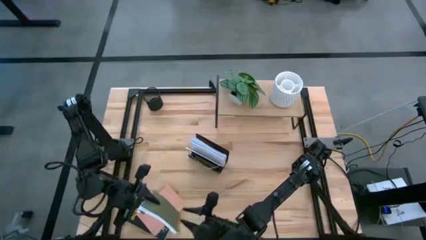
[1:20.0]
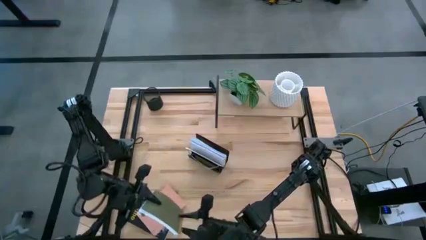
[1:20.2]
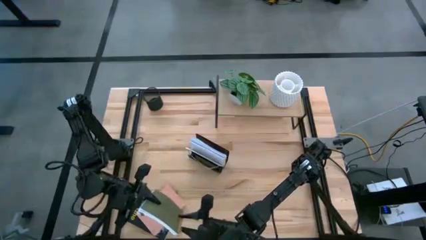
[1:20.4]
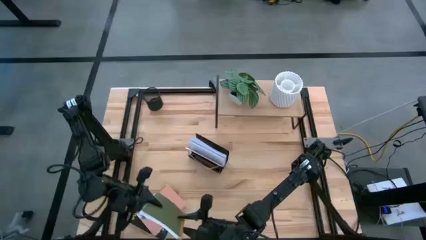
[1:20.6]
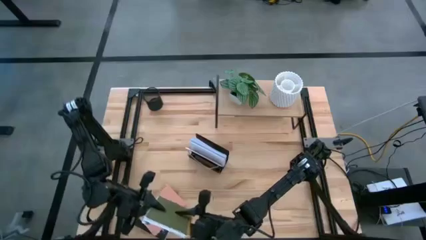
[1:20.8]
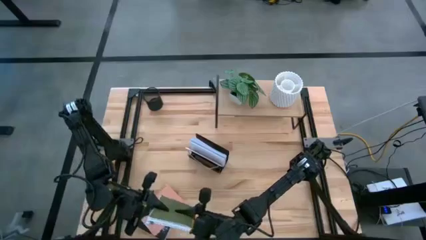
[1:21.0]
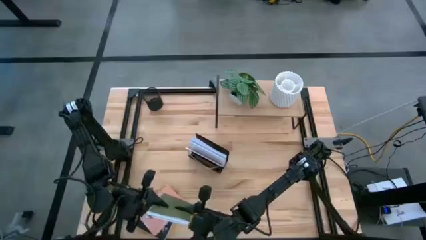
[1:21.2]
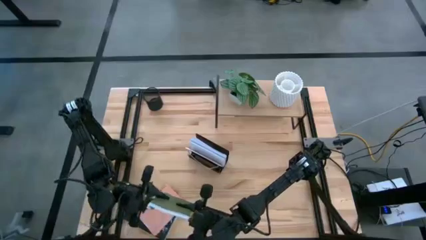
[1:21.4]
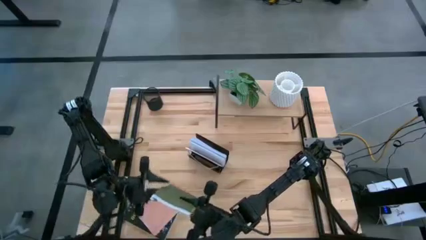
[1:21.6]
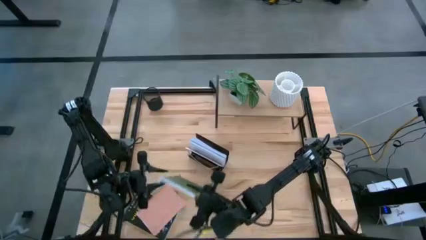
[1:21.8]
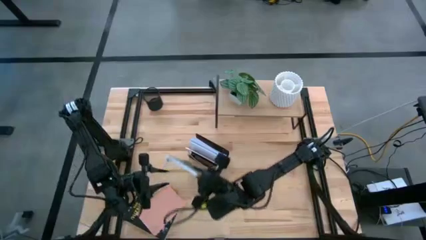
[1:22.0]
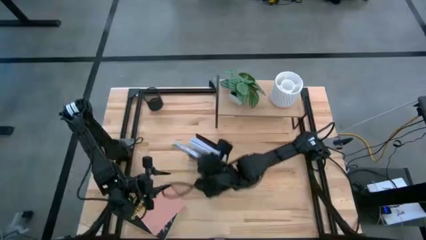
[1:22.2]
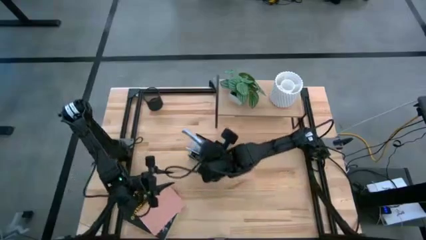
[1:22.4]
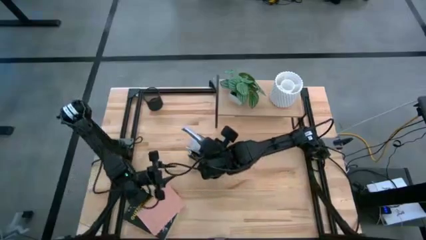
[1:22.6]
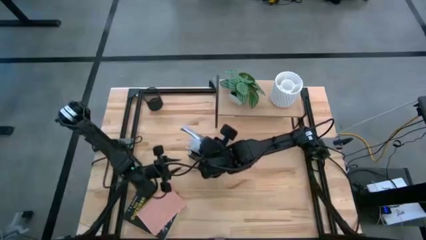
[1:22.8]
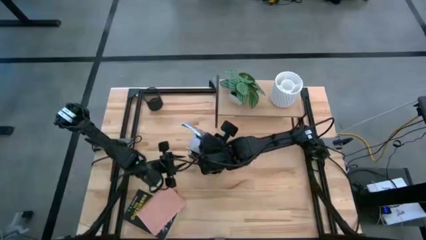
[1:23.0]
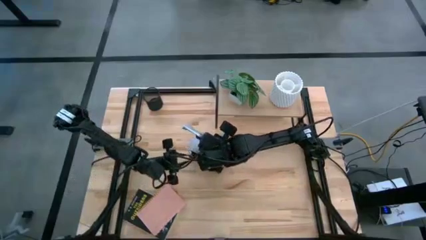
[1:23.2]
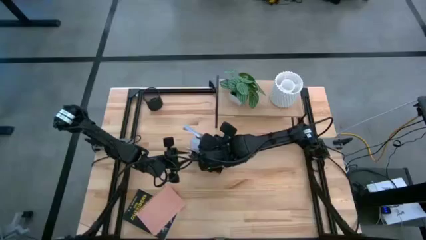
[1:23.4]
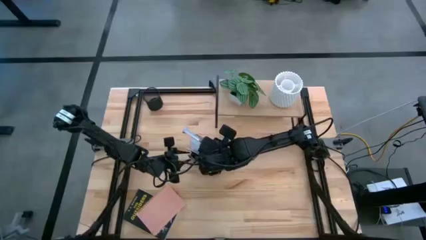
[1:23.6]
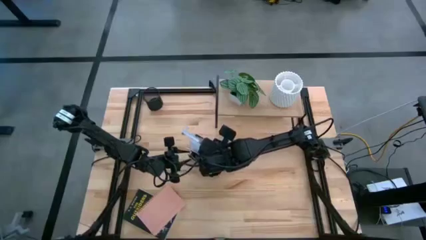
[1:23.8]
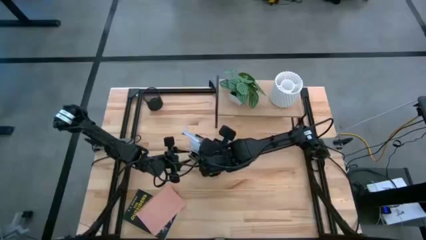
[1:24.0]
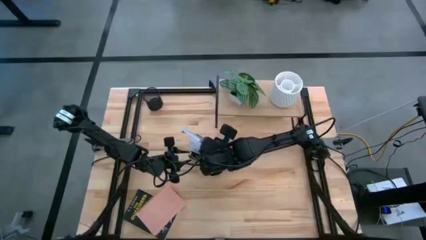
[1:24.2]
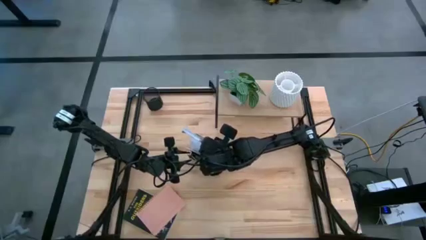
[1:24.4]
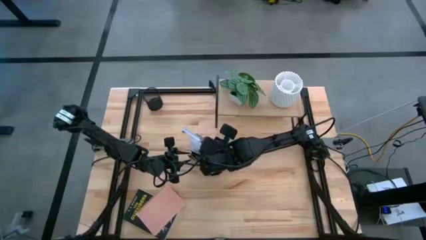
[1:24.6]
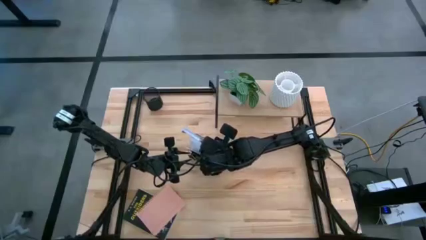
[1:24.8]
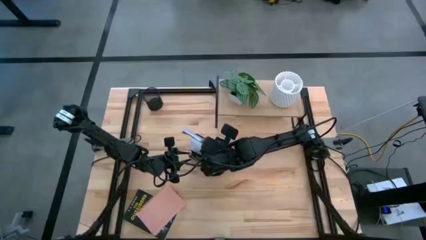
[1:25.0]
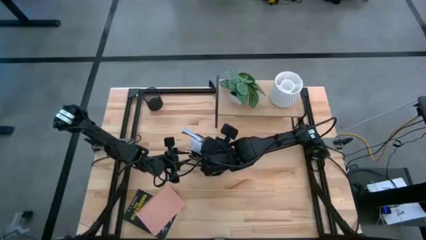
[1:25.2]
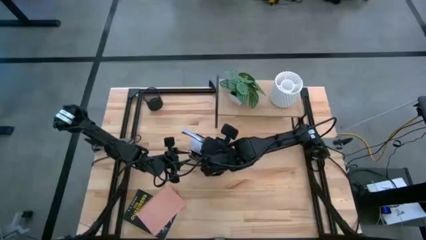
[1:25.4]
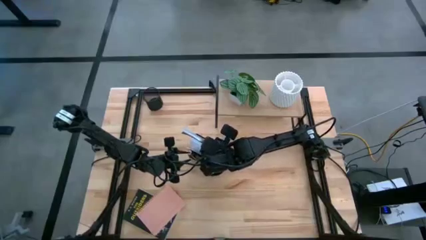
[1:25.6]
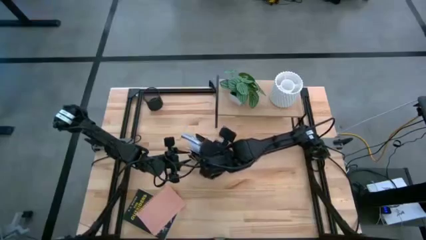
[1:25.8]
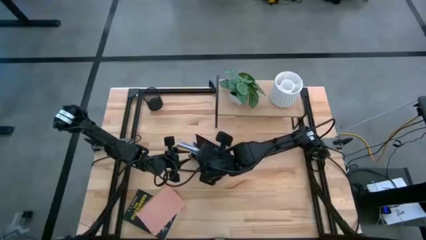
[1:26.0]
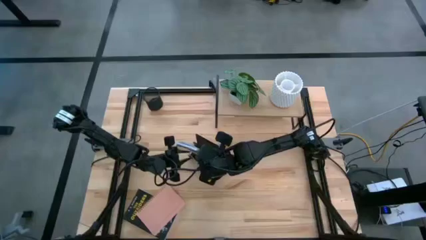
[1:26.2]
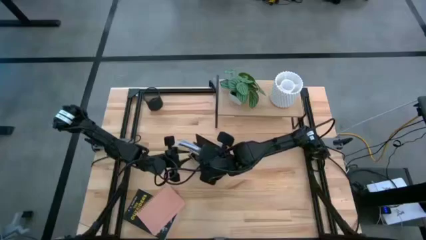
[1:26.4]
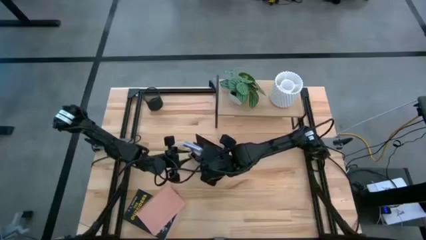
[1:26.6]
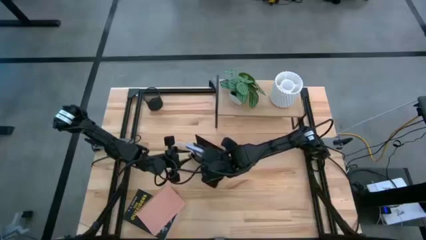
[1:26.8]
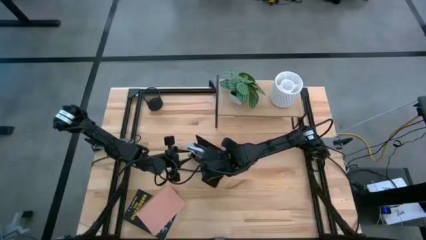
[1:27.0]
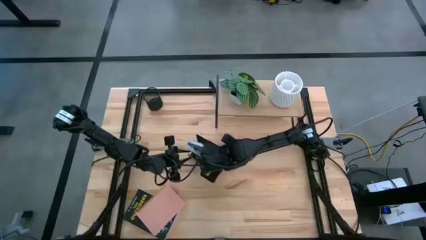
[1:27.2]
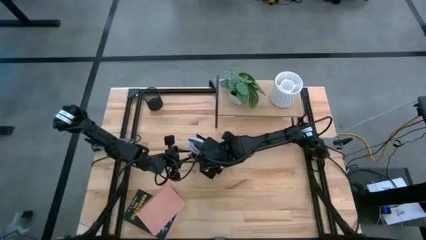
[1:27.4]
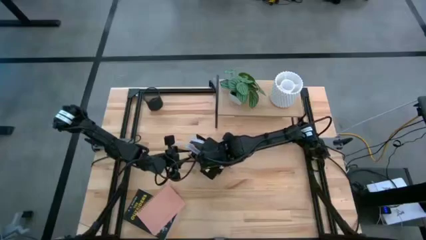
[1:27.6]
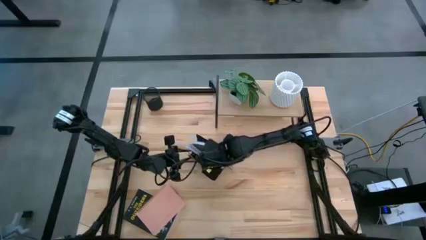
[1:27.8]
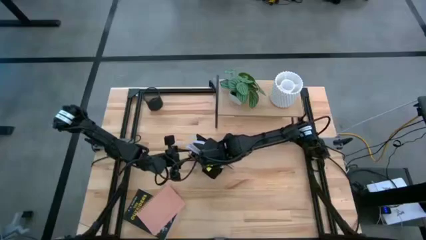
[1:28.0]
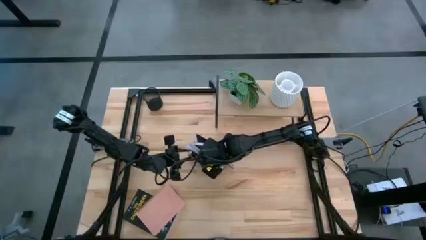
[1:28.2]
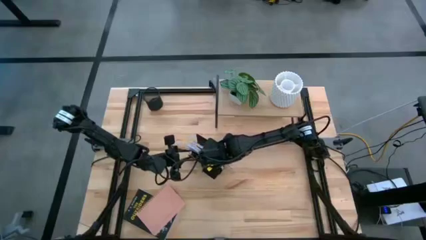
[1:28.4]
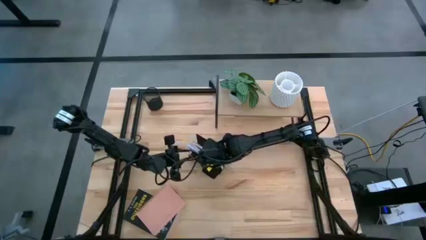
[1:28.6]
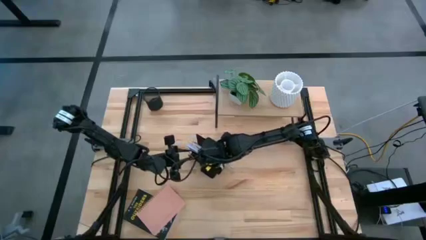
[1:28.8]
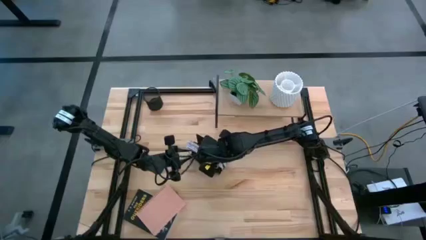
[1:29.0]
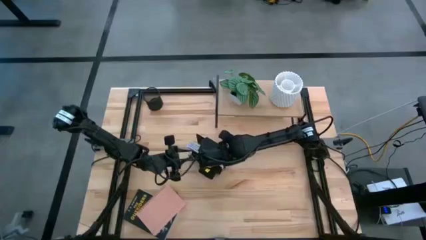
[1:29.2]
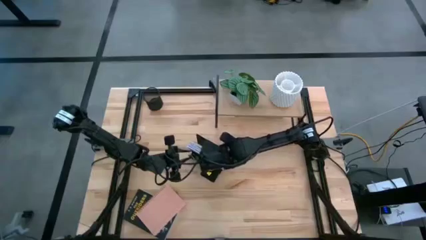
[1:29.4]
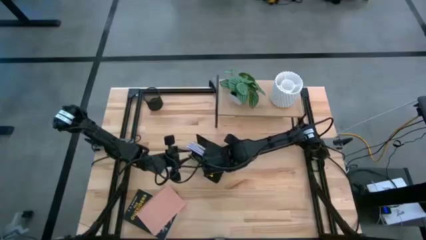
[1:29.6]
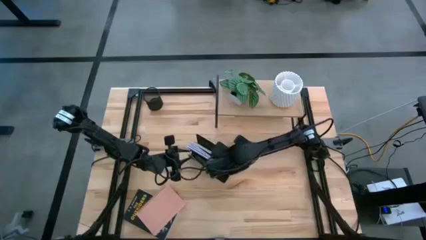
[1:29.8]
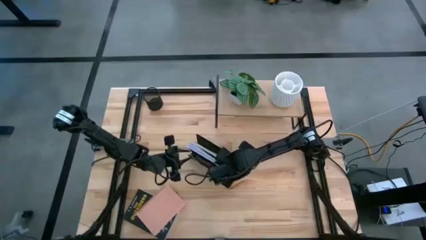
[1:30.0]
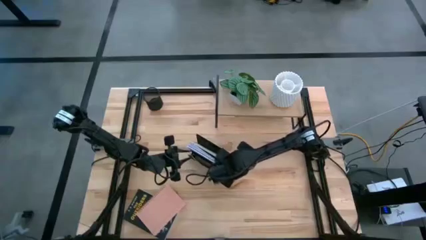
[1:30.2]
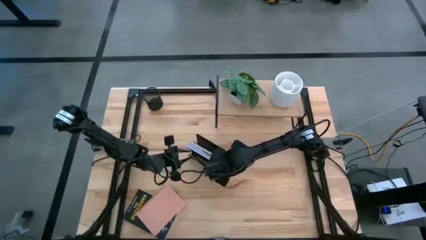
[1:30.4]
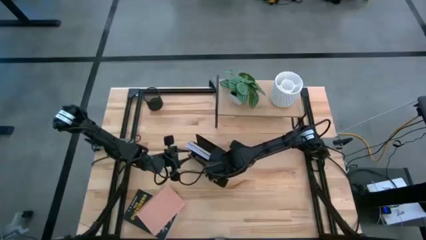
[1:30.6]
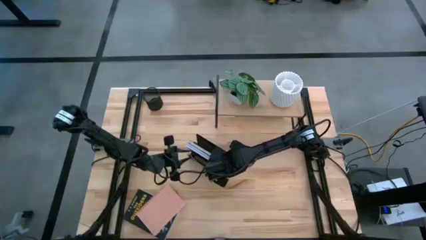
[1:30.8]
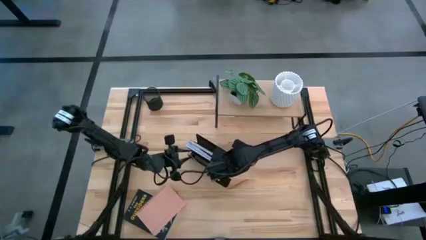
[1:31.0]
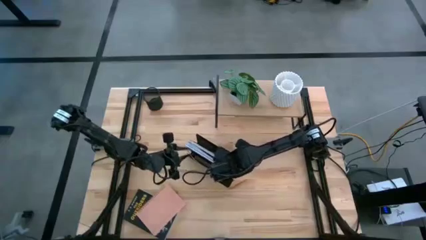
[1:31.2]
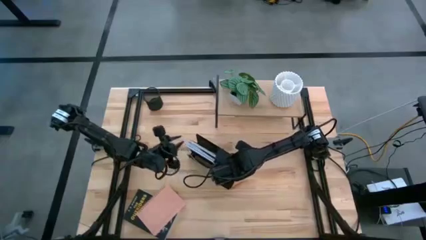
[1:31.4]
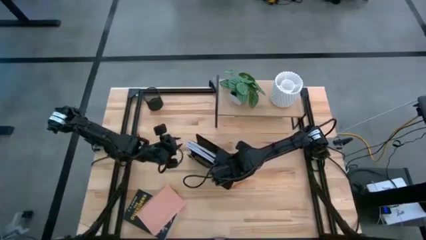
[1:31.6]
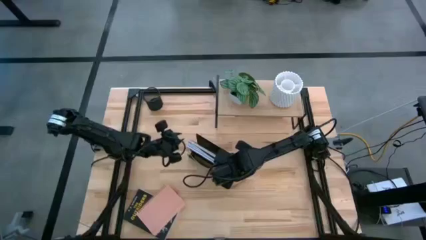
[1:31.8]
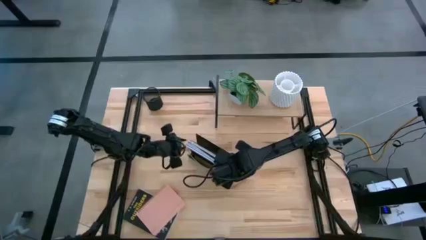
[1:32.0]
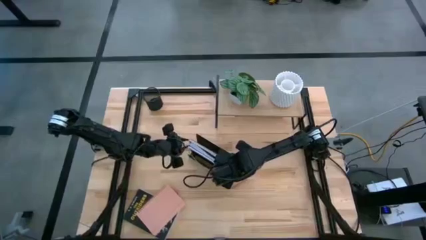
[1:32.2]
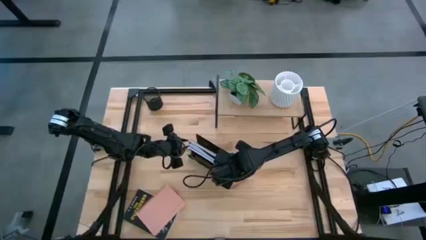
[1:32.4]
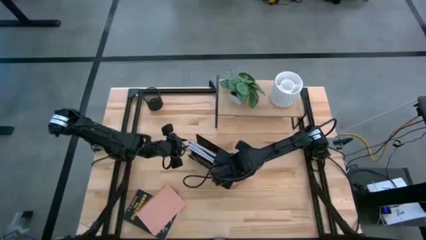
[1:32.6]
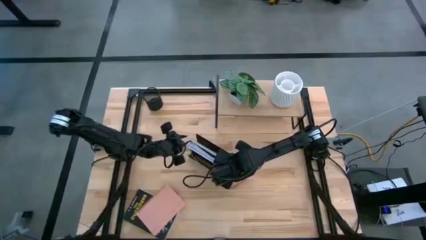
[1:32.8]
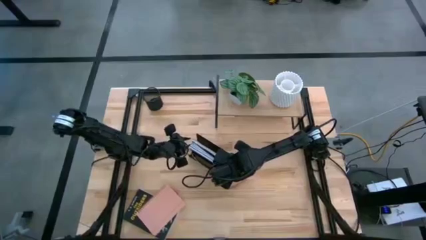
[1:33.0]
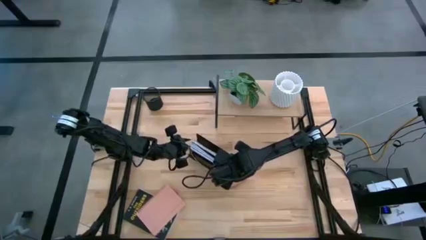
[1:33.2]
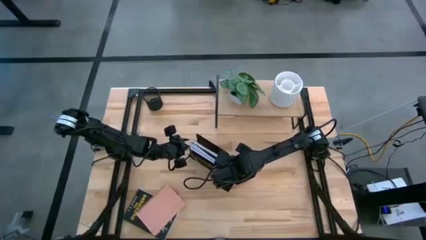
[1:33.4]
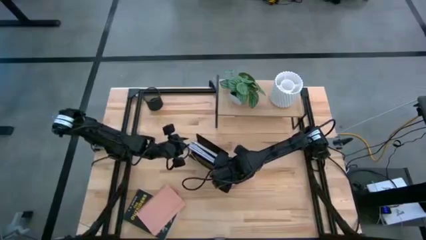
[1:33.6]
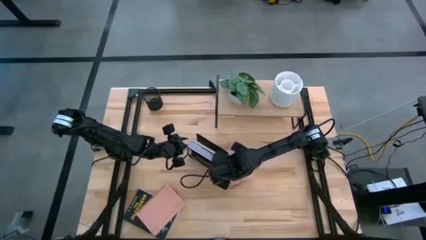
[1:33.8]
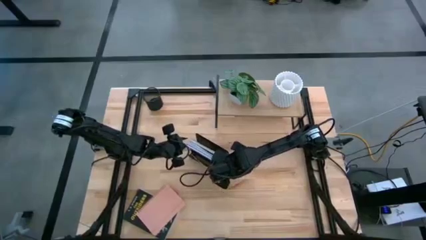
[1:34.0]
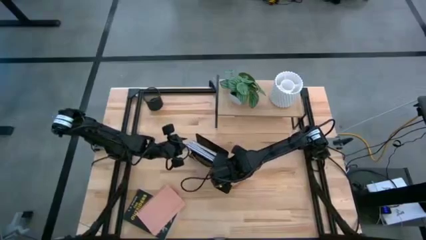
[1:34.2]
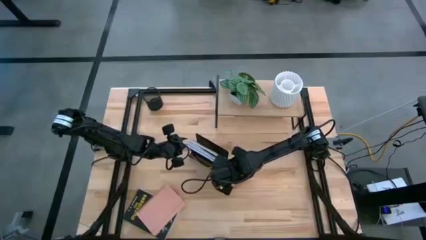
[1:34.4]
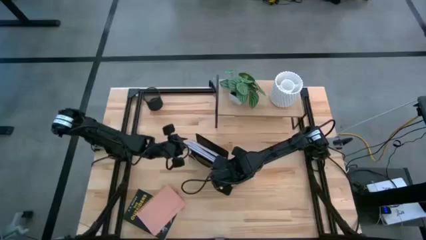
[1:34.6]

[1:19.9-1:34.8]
Task: Stock shelves
Put the green notebook into the black mesh bookshelf
